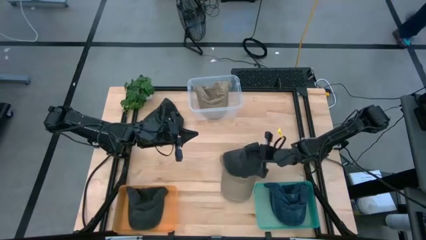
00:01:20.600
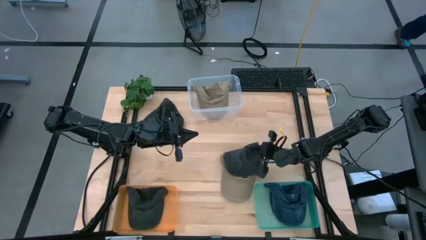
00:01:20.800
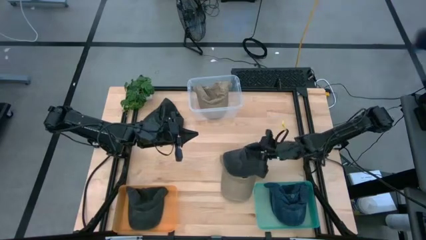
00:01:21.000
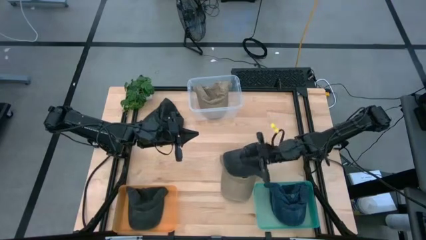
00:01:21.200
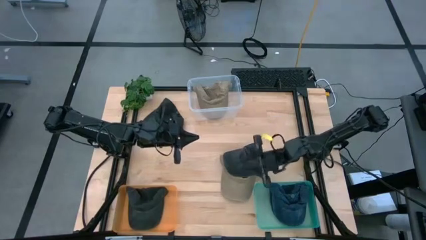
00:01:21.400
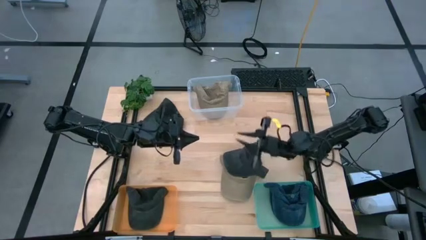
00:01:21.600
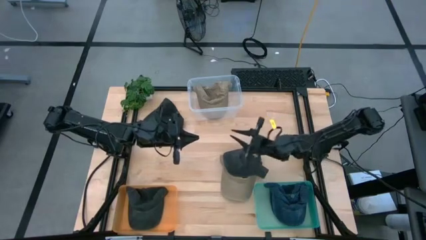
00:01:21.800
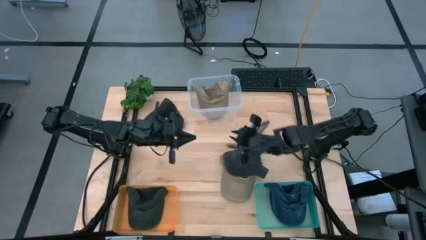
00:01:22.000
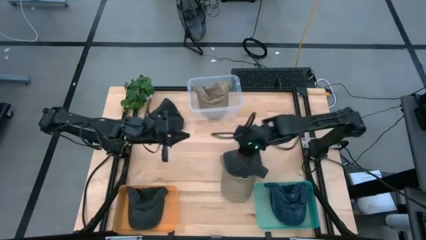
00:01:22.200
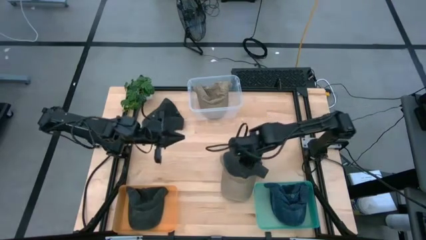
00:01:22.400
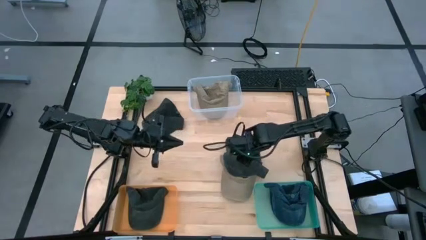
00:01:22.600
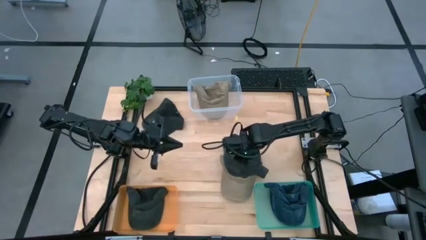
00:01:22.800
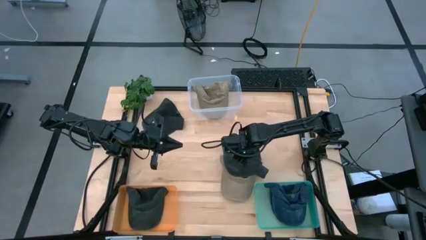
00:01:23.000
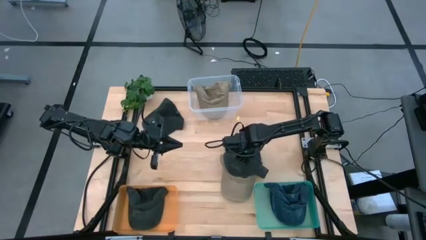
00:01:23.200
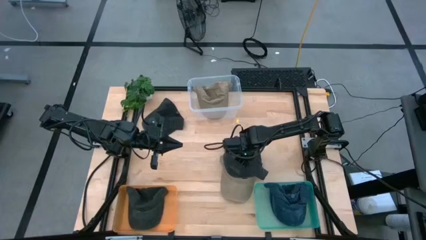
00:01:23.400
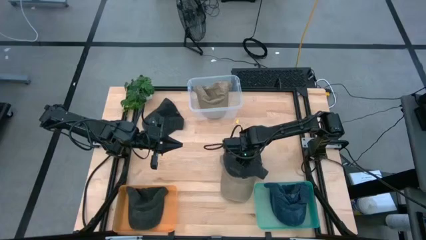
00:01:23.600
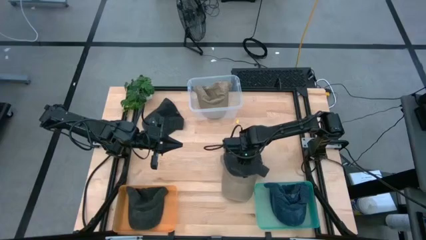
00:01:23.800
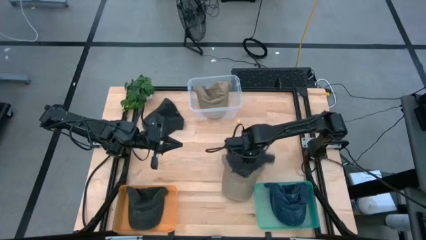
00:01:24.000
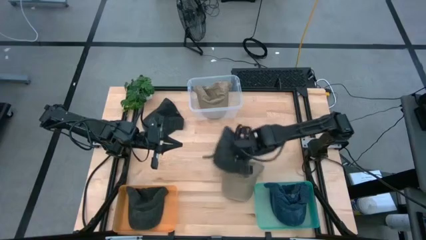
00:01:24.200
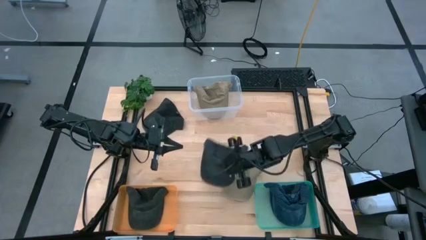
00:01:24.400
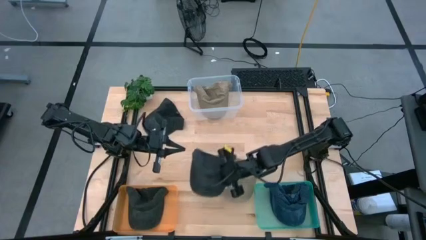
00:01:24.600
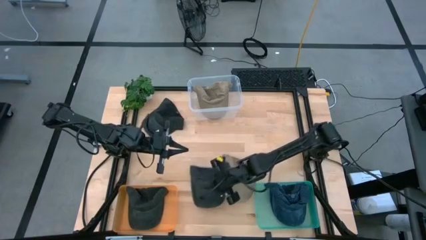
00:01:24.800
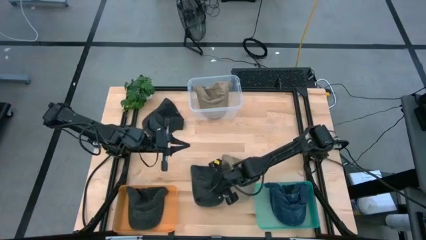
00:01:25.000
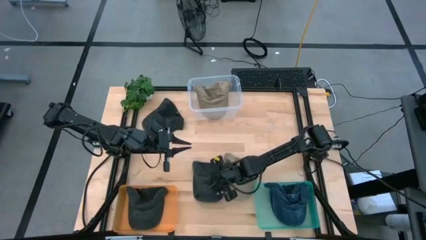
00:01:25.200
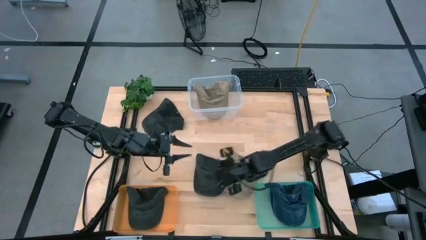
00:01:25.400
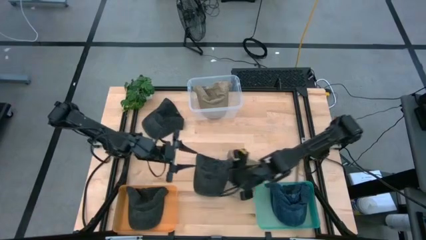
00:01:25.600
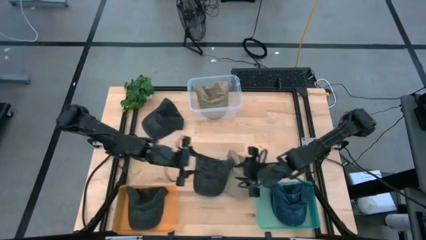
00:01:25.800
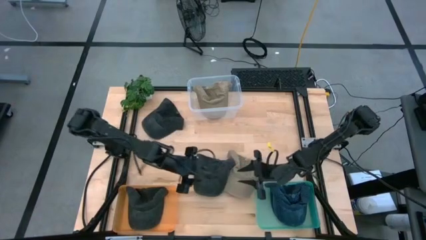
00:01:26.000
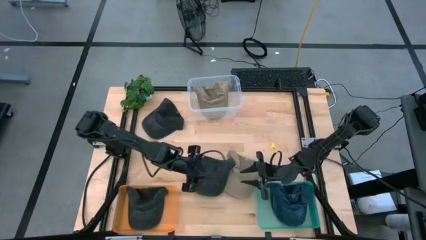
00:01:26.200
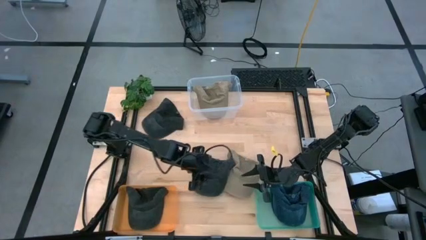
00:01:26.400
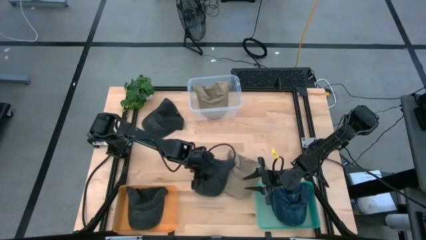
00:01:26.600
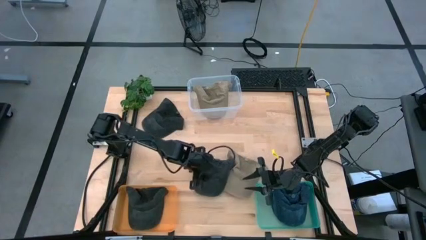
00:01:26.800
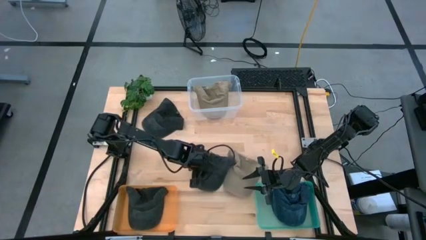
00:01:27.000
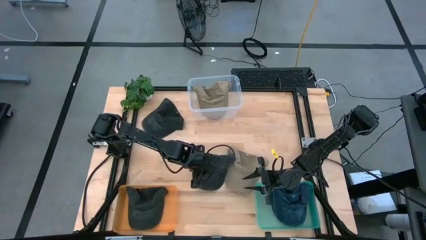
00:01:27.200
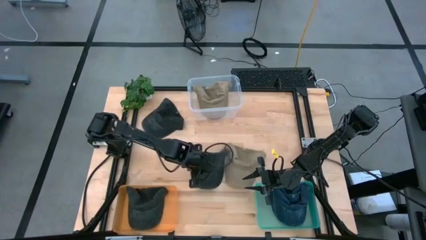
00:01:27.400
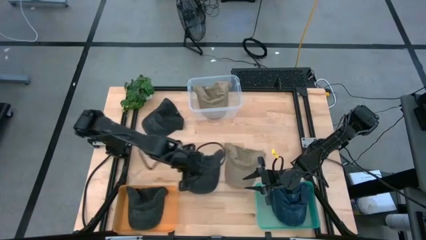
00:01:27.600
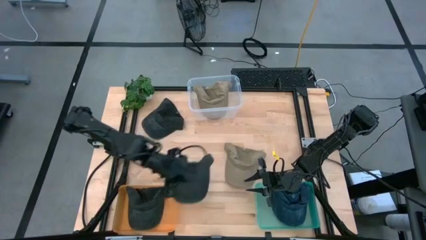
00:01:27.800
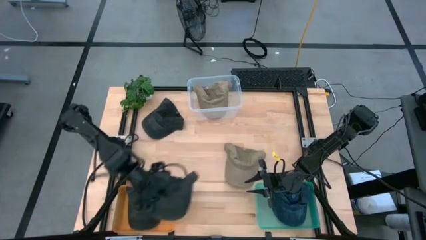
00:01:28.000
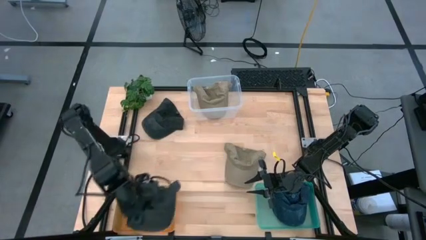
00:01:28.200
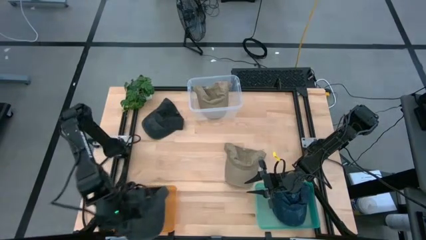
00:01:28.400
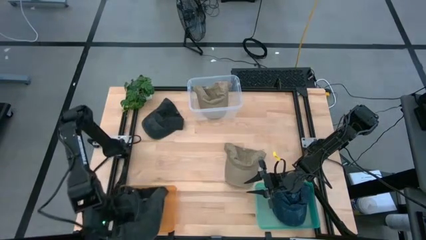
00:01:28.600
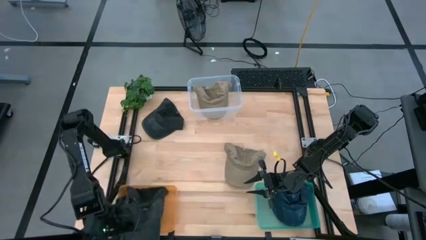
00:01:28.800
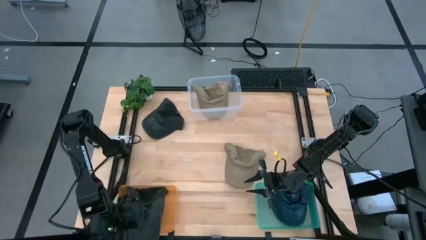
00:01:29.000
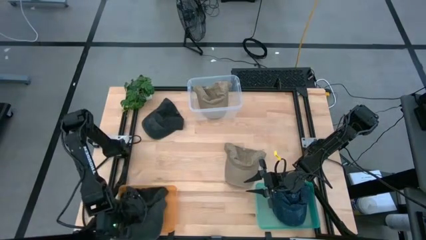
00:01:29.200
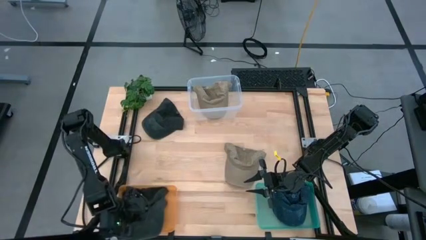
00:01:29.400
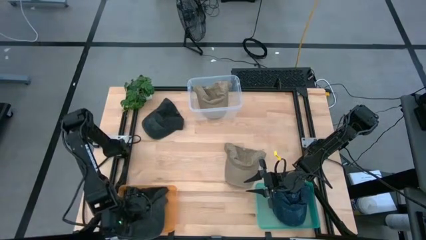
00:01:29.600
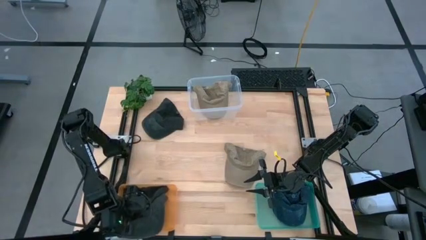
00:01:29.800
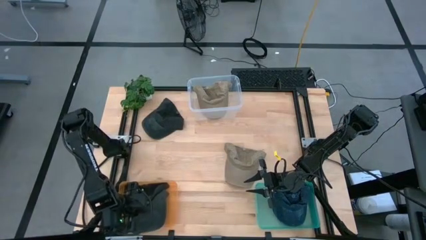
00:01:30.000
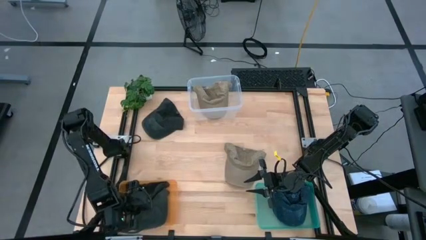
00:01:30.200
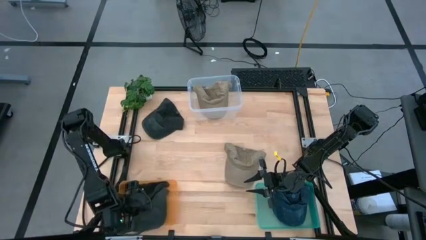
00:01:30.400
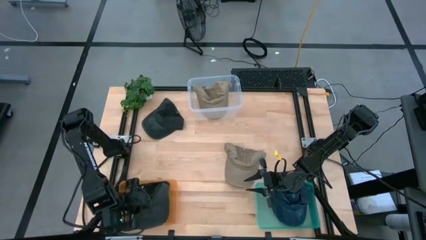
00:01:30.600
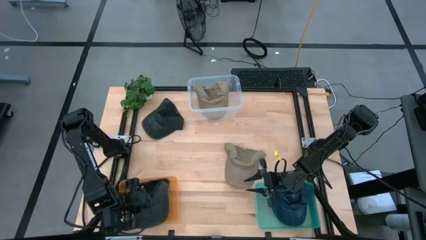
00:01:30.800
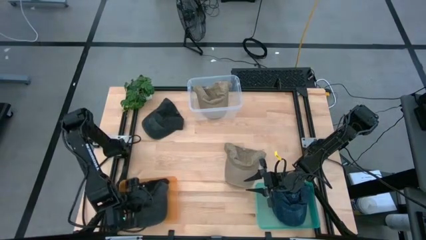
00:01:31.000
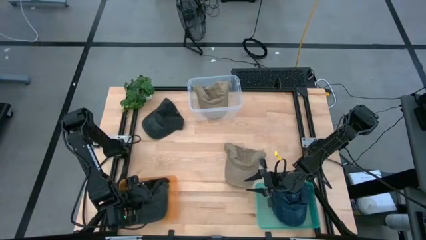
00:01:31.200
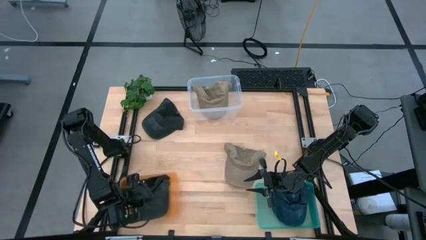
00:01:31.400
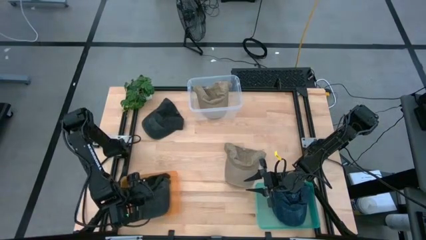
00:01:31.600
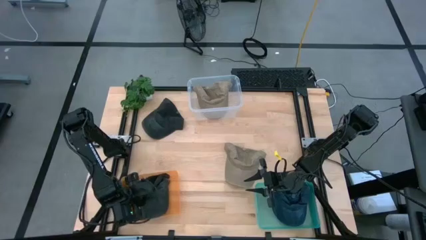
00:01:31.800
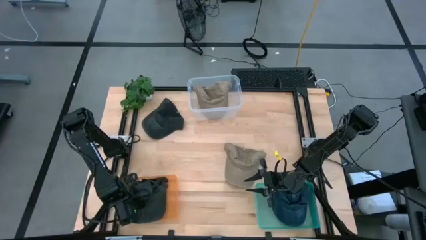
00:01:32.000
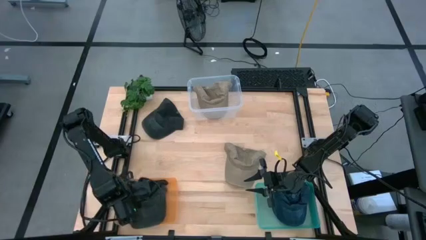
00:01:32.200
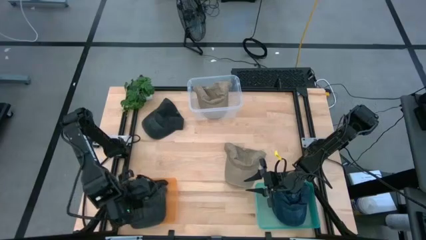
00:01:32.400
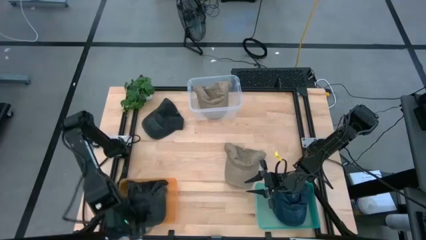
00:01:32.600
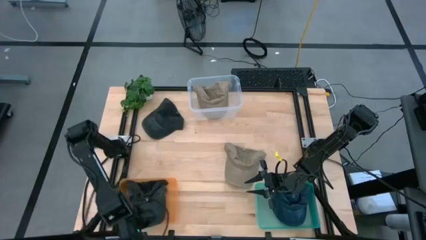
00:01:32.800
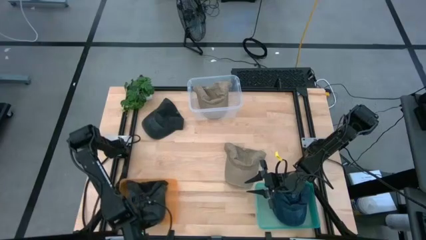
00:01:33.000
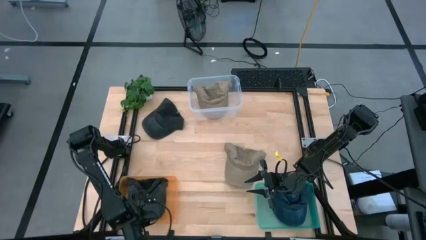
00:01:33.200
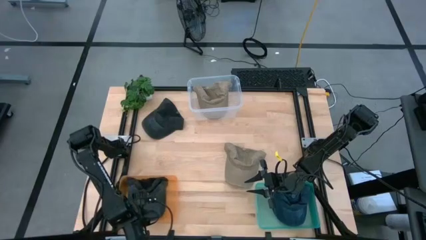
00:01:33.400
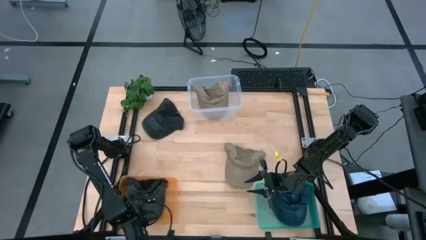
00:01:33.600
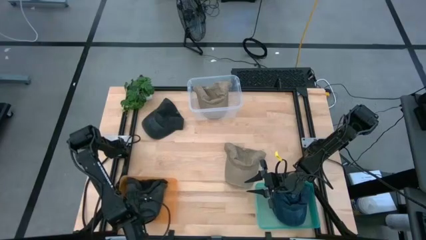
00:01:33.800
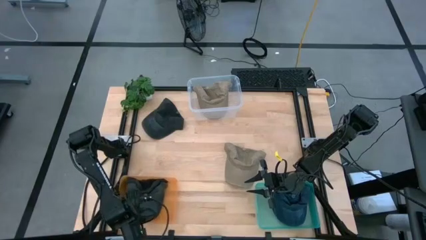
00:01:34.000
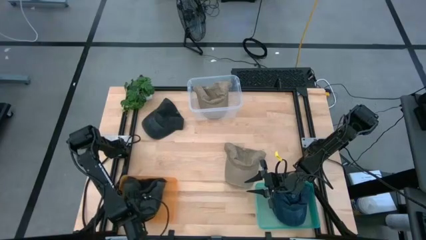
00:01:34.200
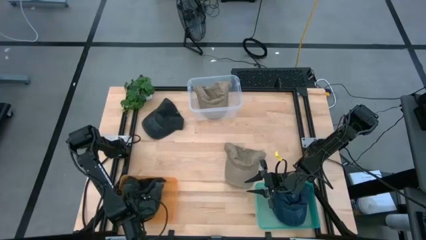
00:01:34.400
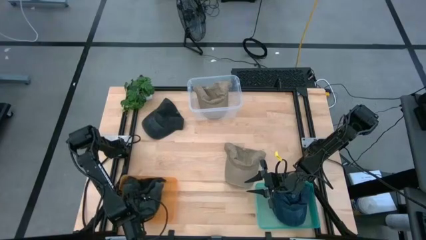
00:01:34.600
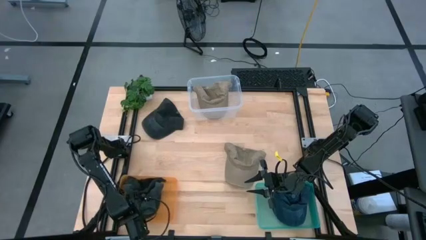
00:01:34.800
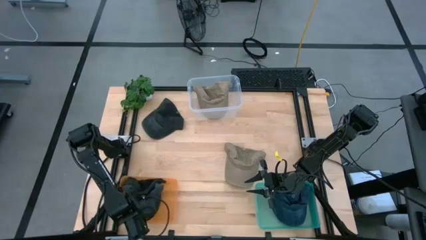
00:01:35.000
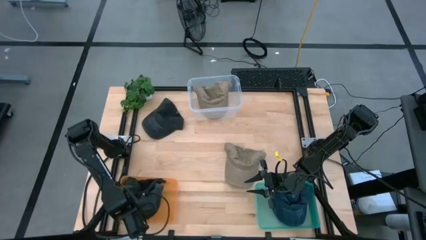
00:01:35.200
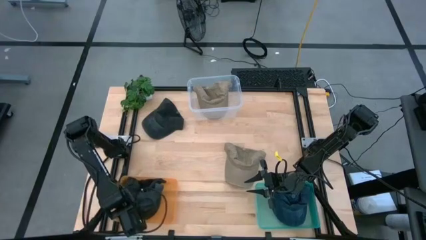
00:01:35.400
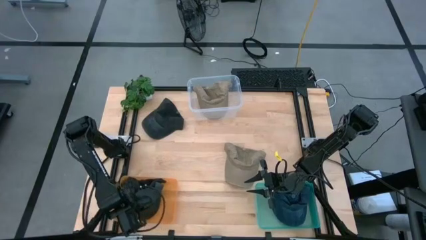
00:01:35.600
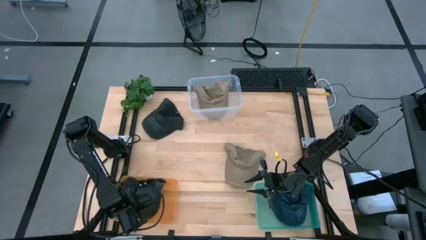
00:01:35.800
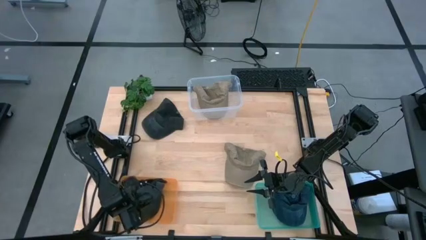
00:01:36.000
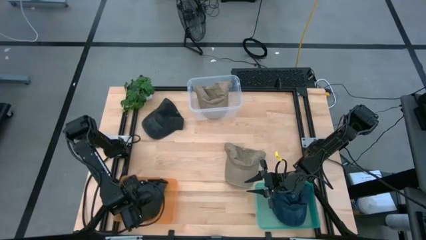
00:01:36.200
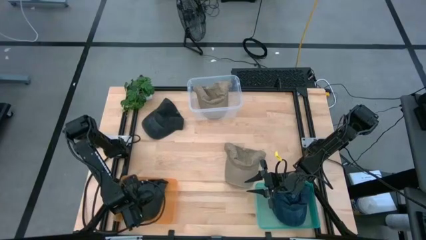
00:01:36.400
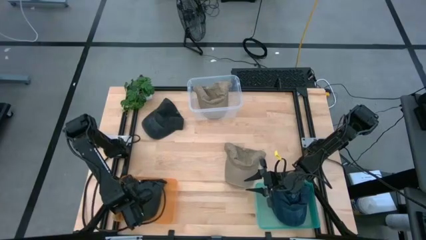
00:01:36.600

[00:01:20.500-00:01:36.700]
Task: Pick & Place hat
Put the right black cap into the orange bin

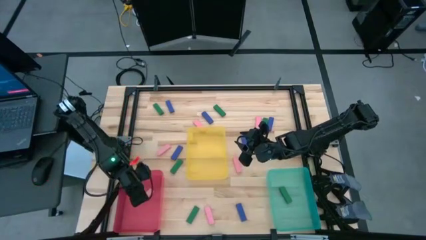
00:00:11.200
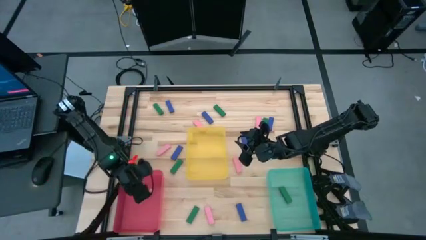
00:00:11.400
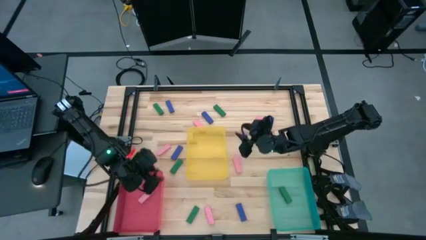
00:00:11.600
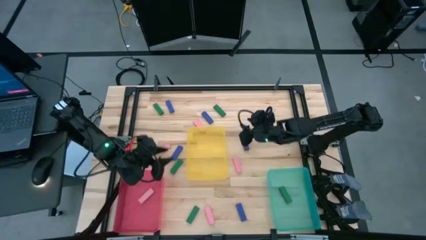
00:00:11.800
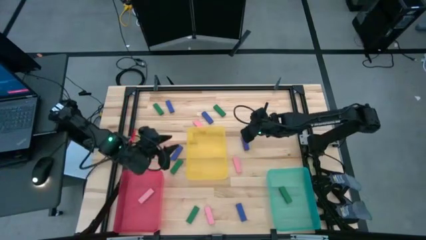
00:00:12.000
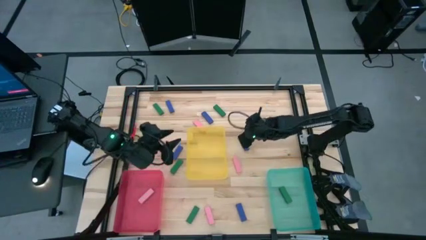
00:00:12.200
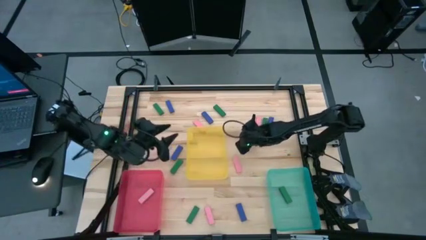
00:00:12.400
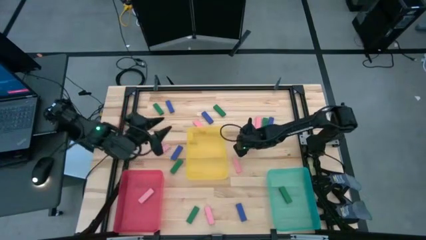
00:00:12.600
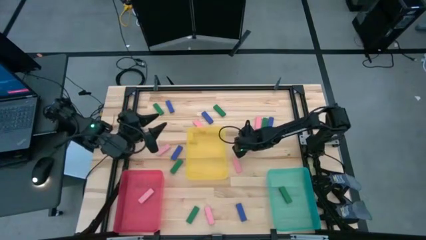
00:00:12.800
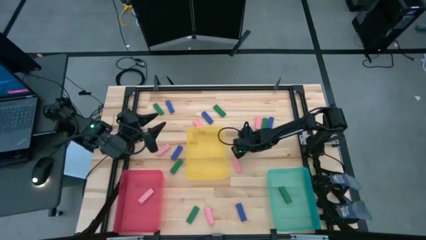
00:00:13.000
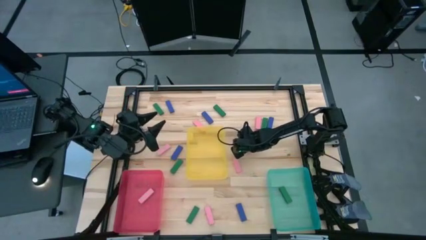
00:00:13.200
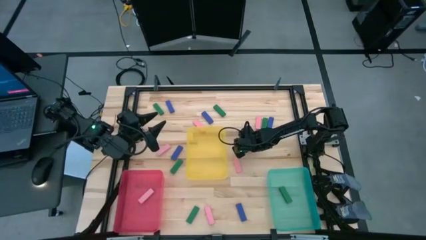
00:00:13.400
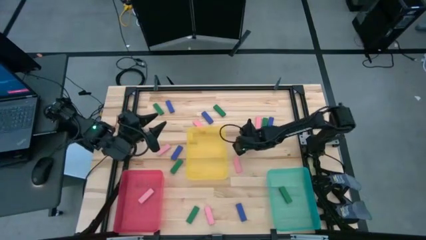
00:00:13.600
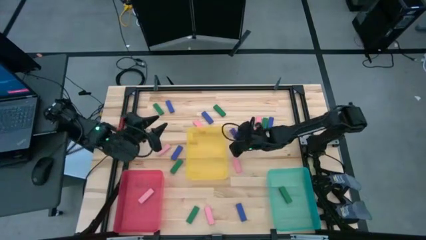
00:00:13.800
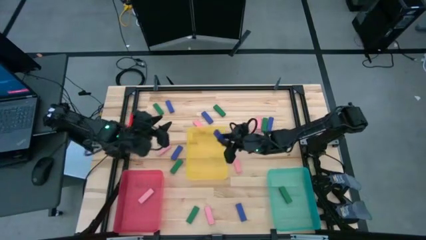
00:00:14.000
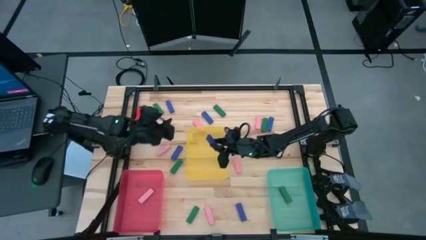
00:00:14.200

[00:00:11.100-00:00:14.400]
Task: Sort blocks
Put the blue block into the yellow bin
